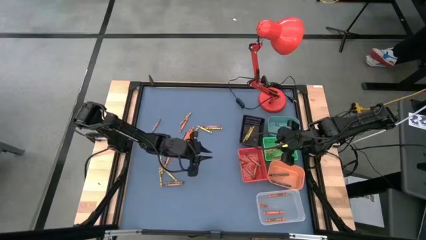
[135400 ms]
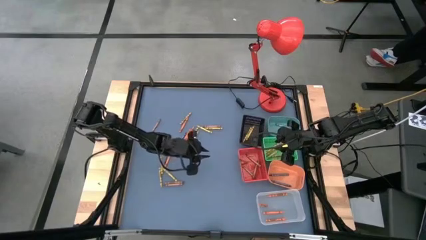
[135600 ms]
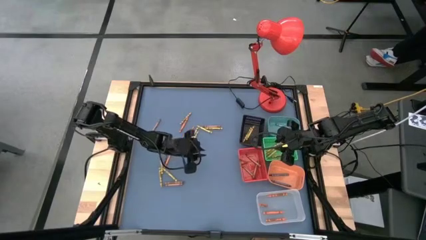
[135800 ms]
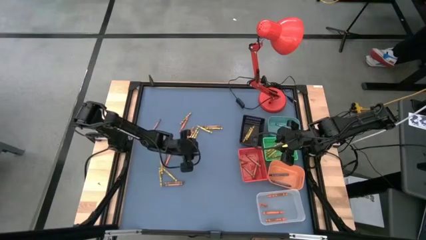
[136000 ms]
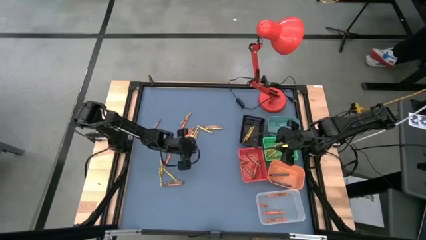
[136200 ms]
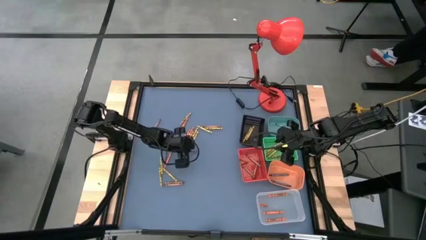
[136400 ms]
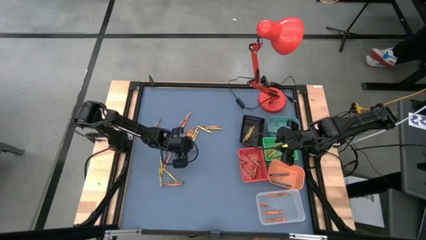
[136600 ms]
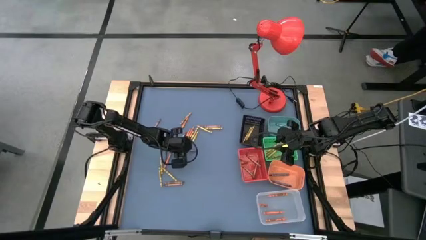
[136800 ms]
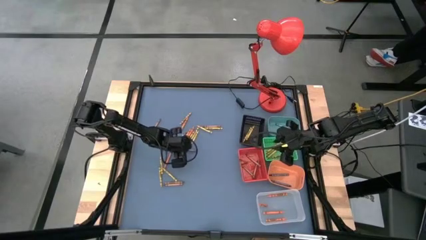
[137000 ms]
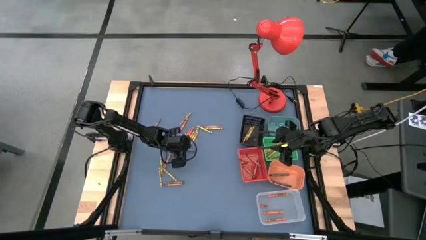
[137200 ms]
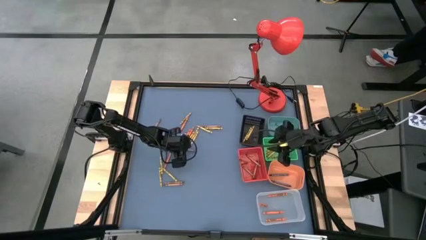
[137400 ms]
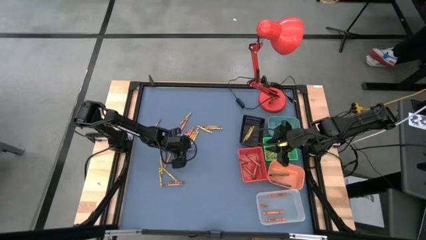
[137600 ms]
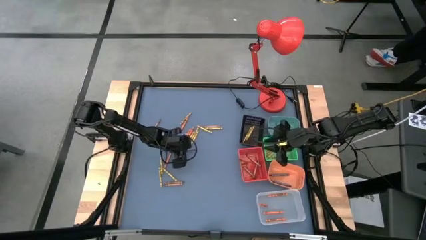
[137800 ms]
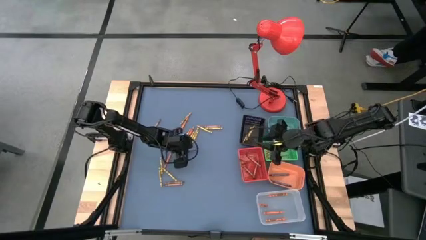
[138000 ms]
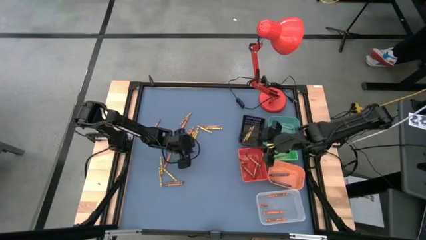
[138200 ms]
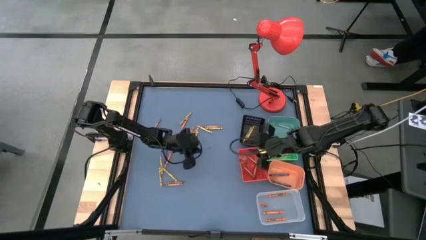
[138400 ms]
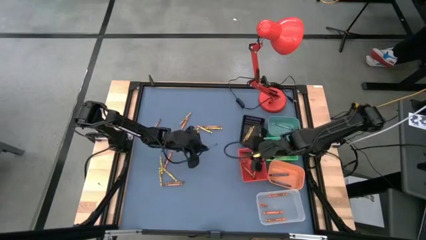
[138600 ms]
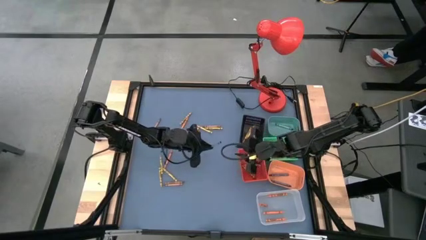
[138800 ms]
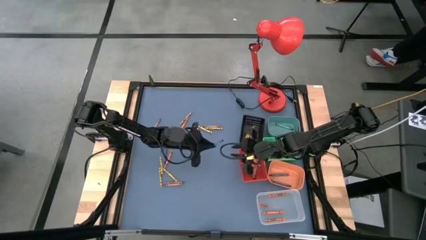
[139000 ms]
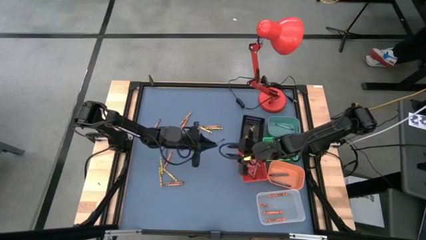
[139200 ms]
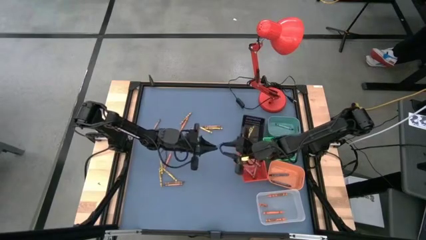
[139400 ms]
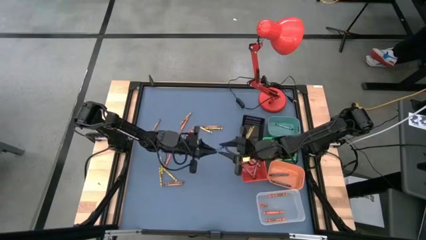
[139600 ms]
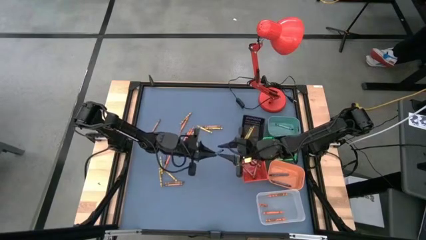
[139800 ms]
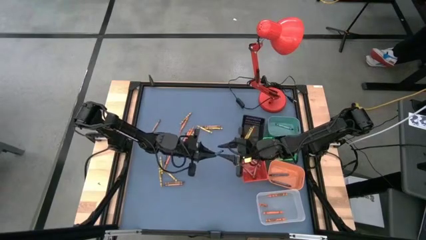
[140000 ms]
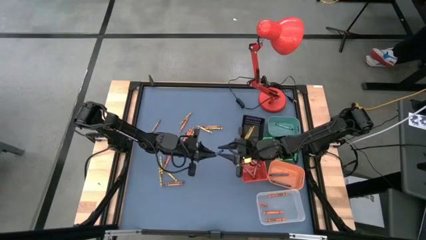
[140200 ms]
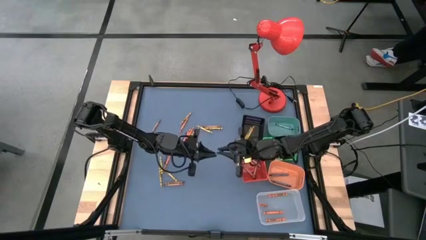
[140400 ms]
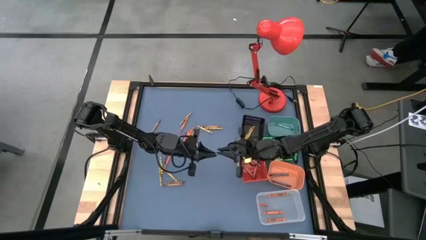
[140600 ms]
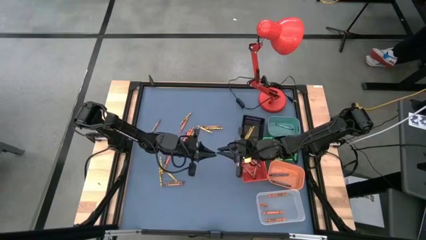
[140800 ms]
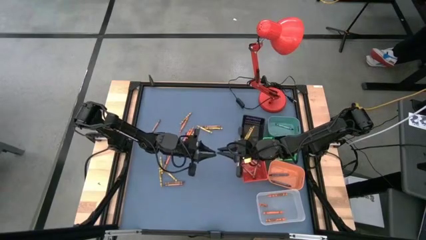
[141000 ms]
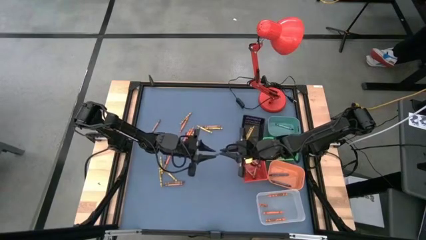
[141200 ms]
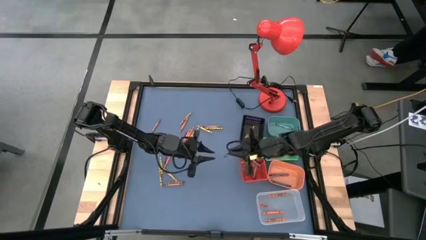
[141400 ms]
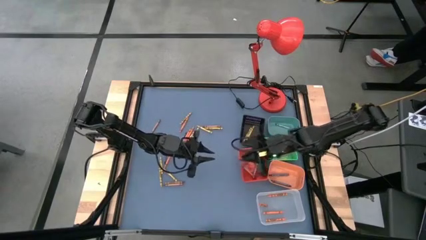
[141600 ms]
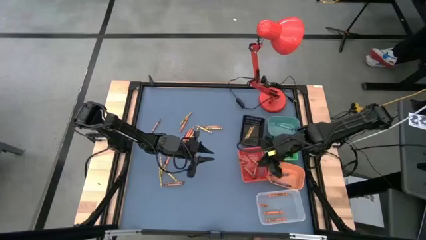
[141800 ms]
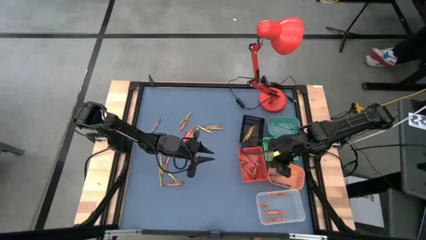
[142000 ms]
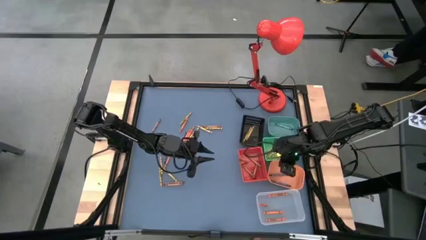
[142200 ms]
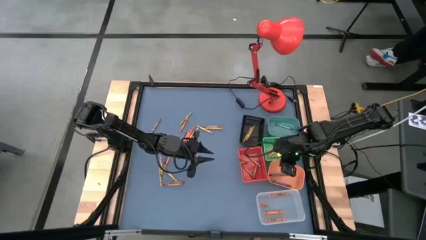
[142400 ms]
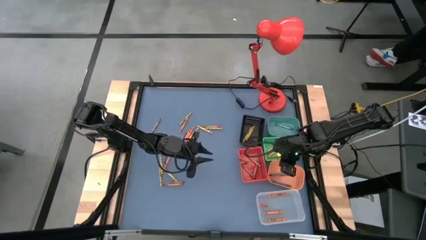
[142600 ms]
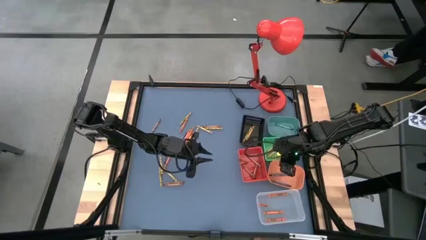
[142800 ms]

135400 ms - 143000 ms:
Task: Sort crayons
Put the blue crayon into the orange bin

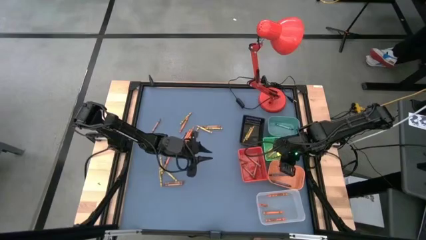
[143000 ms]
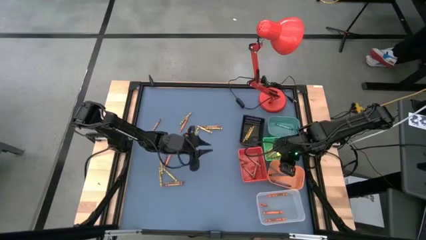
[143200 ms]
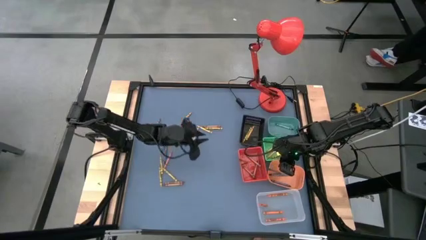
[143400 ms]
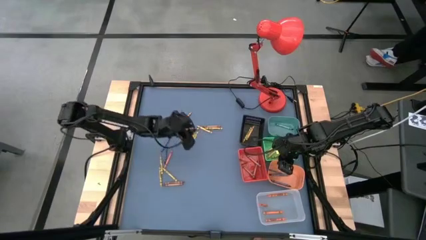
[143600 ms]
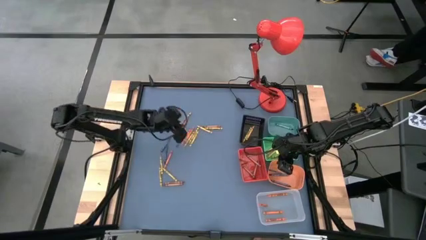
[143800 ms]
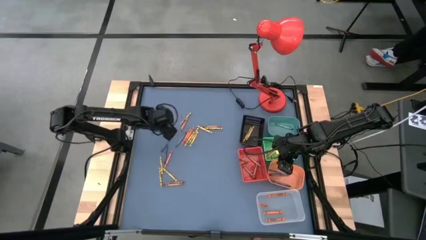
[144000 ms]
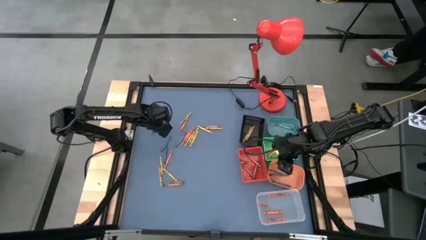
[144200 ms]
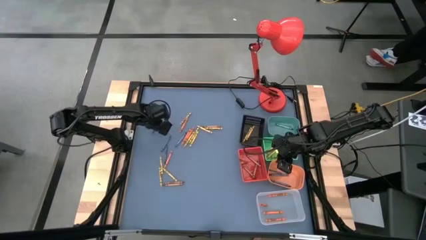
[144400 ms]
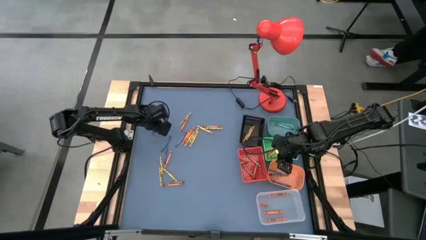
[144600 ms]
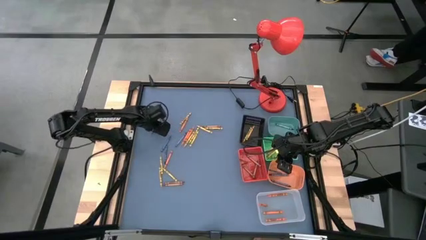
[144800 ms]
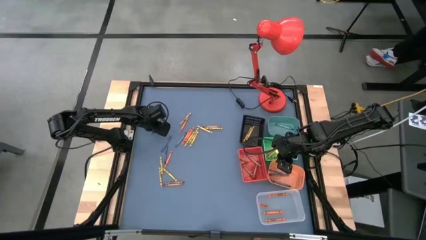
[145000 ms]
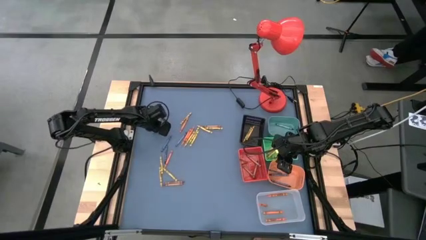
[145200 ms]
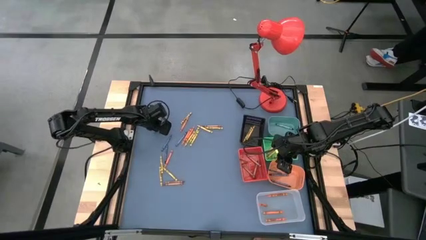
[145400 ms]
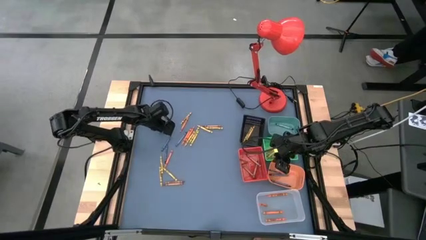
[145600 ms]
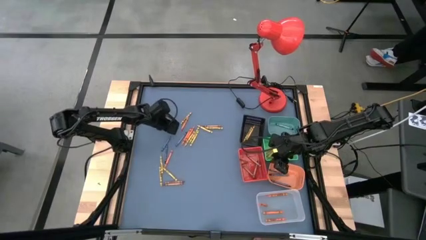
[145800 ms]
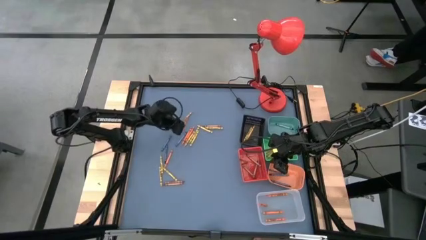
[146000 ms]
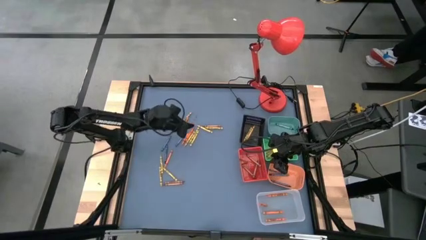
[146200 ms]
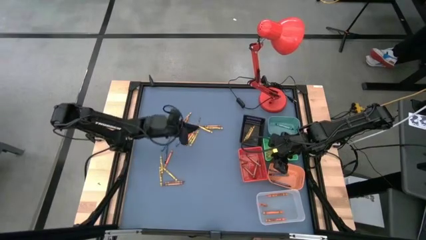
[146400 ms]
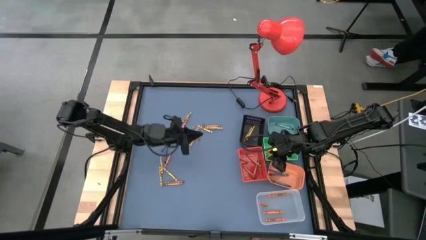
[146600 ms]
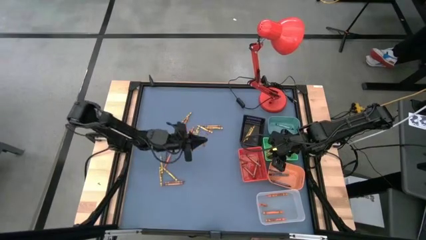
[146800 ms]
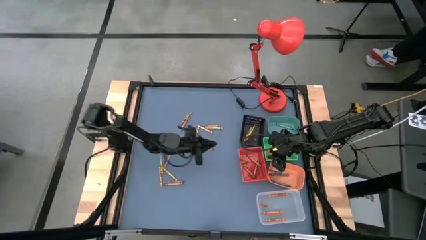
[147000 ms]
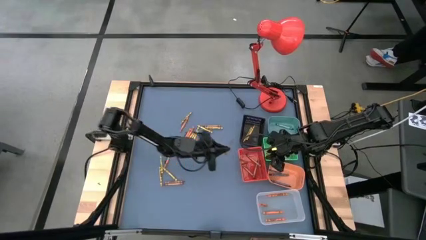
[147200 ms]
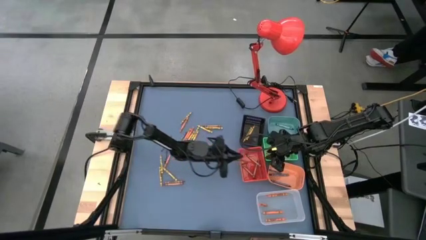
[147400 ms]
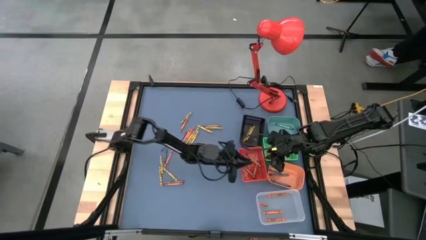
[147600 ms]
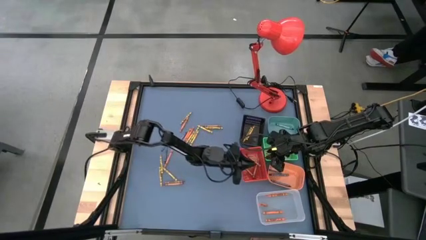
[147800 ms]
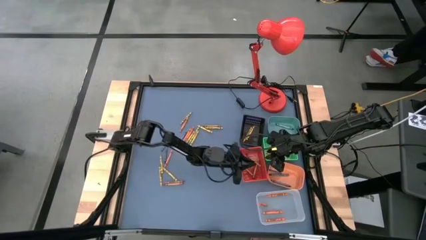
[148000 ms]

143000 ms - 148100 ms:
Put the brown crayon into the red basket

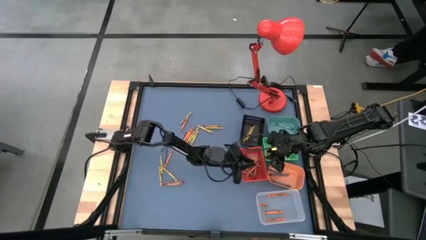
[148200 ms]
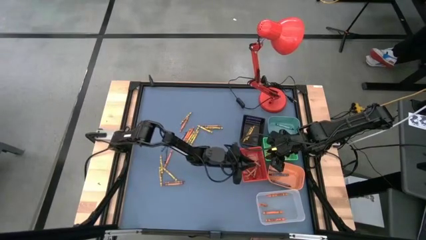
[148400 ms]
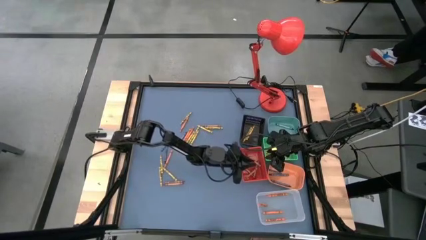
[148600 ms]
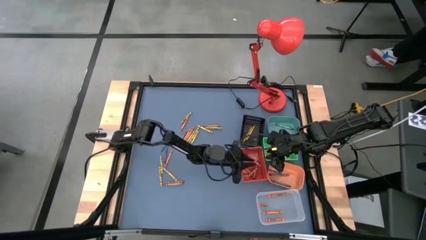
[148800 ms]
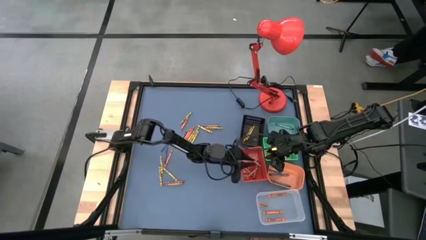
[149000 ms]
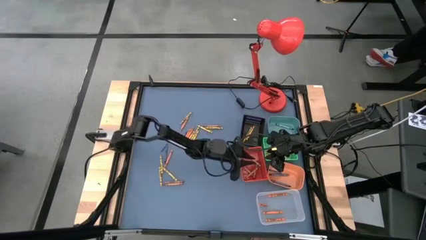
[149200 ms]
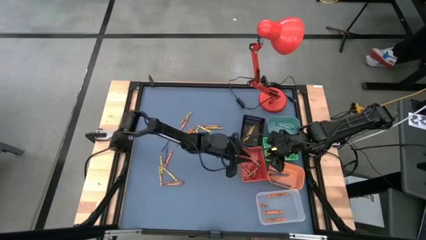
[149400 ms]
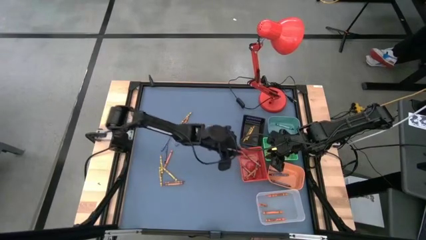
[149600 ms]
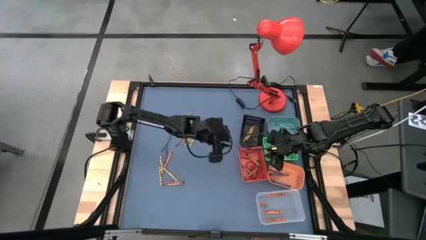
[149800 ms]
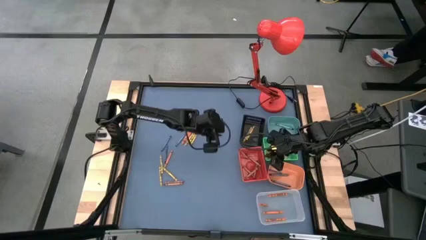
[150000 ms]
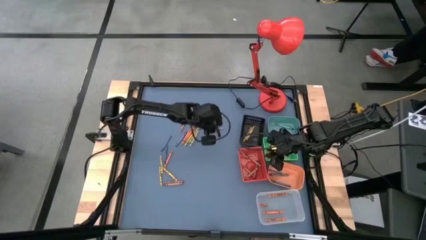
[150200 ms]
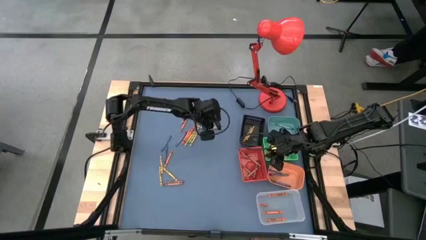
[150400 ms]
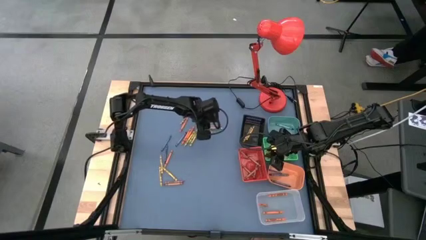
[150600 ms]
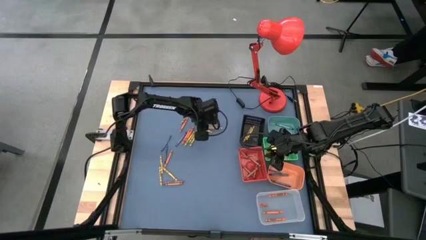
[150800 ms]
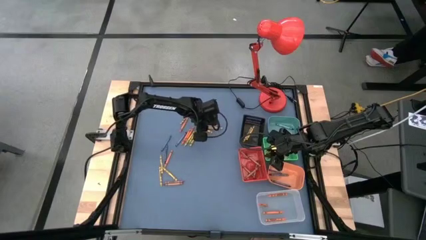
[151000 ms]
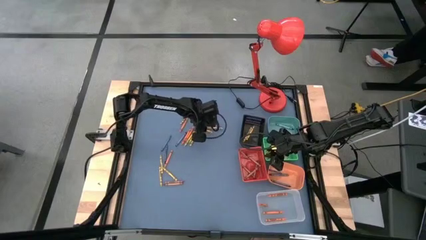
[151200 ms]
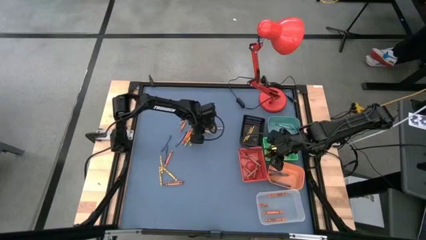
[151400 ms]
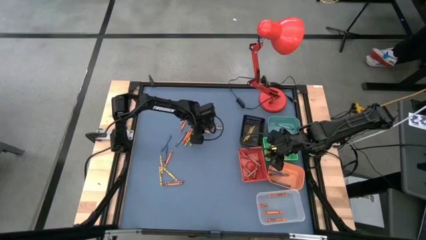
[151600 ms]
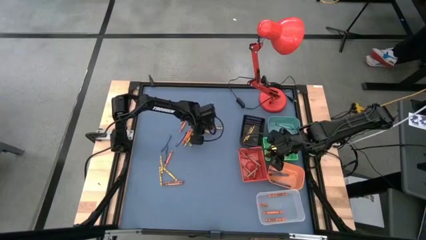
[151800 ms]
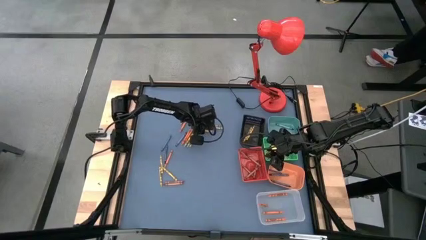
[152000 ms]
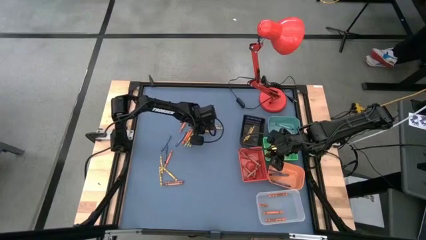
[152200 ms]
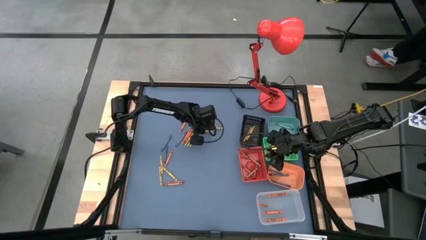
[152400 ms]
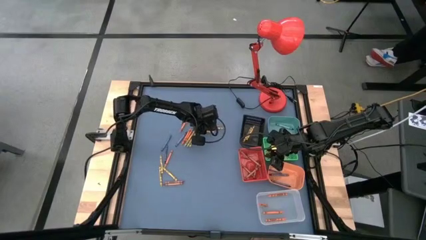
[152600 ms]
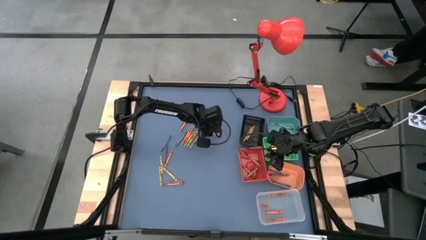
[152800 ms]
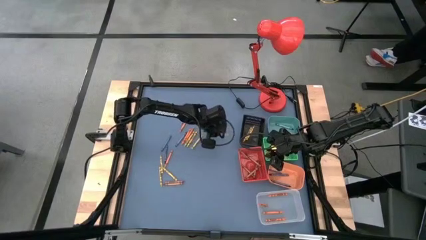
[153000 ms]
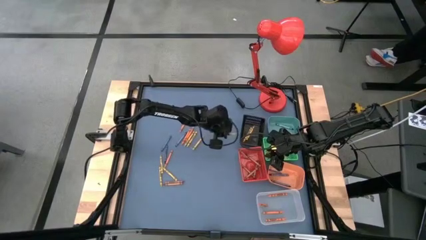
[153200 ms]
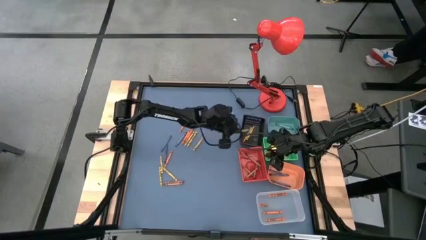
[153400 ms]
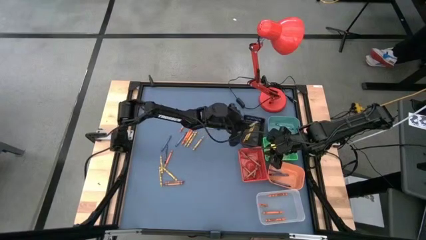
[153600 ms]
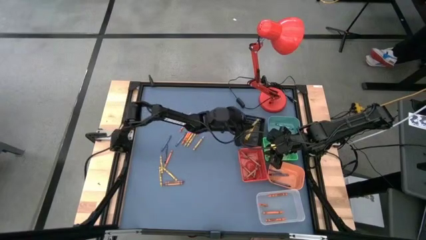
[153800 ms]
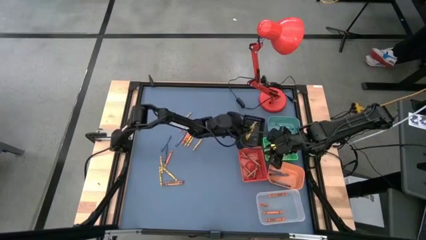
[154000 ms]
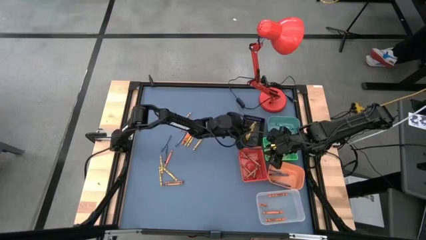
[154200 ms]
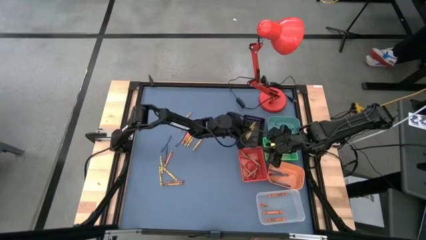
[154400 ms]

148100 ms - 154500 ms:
Put the yellow crayon into the black basket
